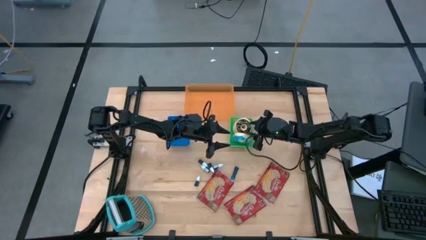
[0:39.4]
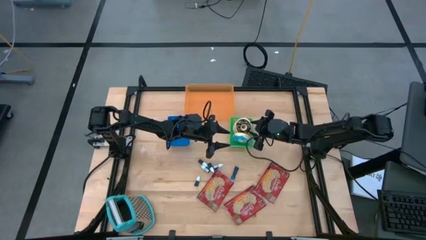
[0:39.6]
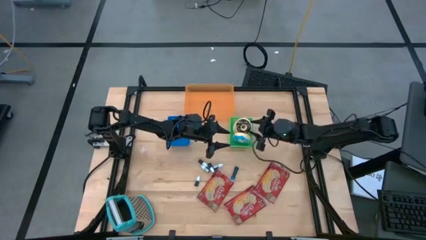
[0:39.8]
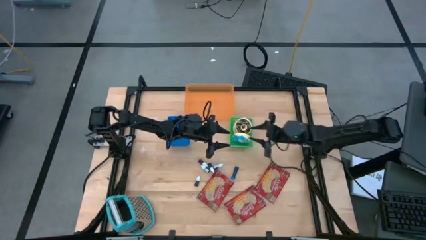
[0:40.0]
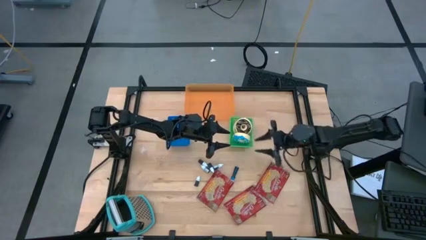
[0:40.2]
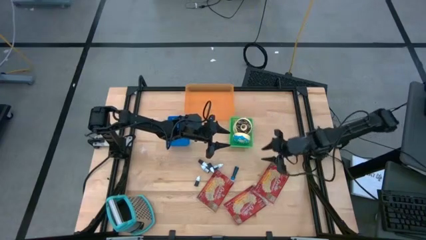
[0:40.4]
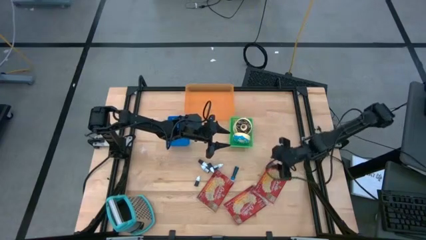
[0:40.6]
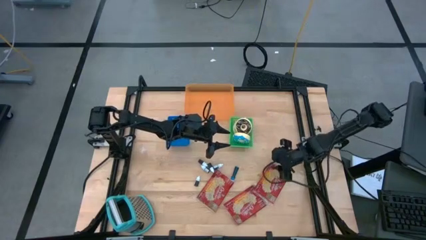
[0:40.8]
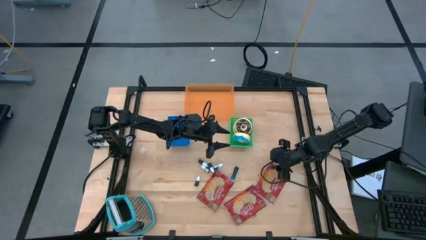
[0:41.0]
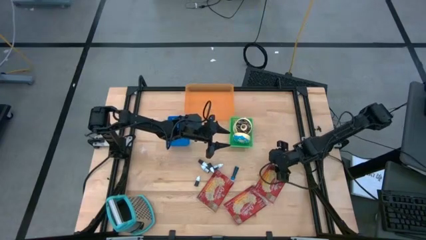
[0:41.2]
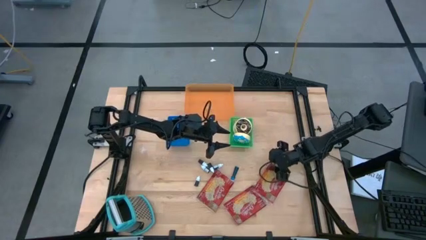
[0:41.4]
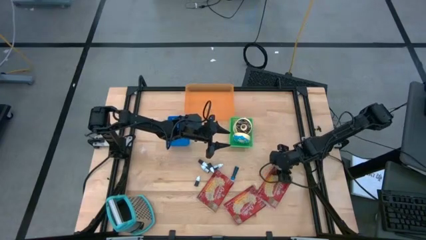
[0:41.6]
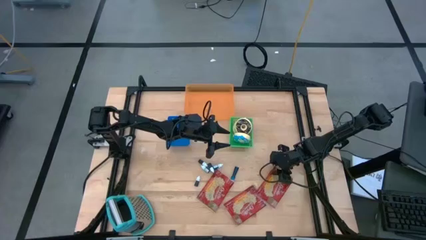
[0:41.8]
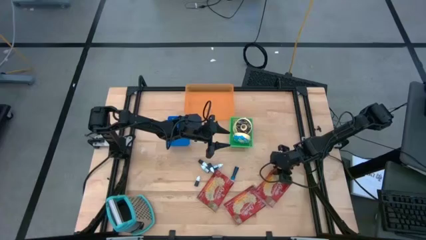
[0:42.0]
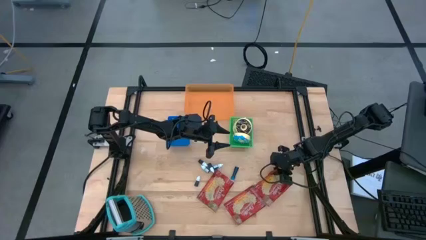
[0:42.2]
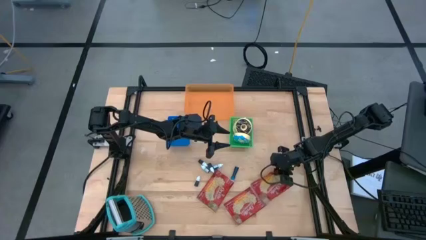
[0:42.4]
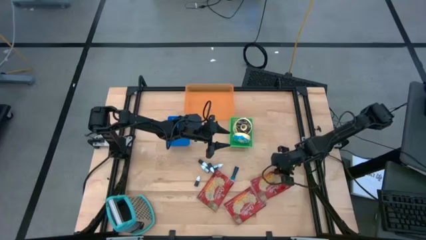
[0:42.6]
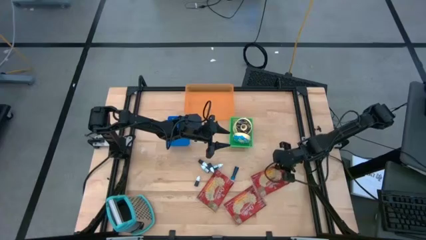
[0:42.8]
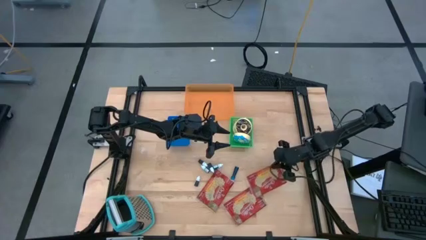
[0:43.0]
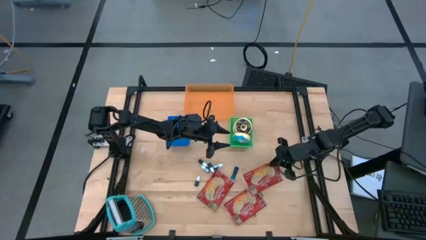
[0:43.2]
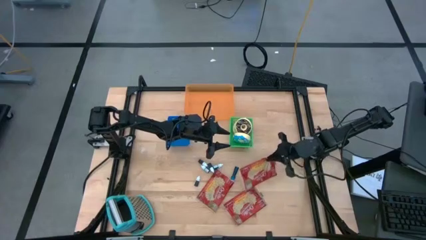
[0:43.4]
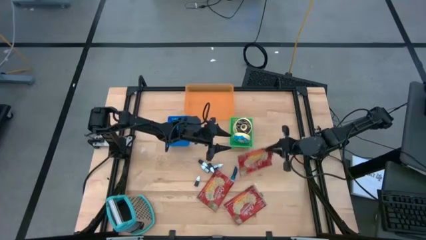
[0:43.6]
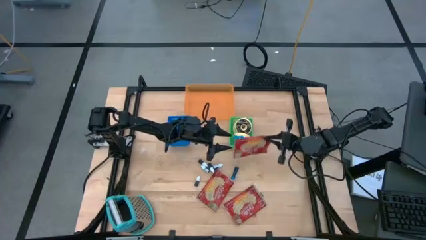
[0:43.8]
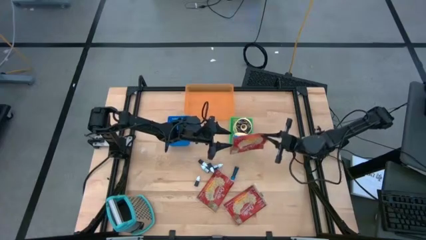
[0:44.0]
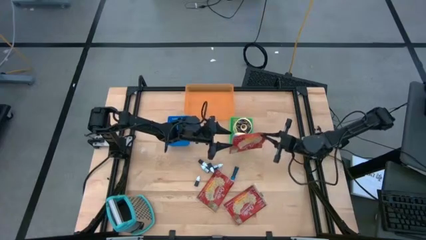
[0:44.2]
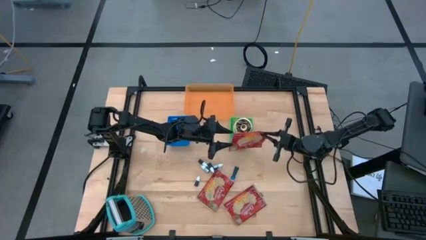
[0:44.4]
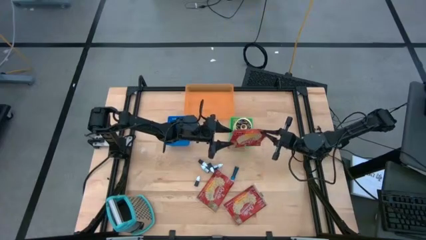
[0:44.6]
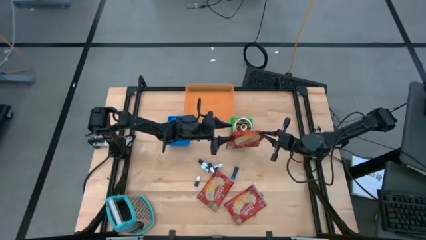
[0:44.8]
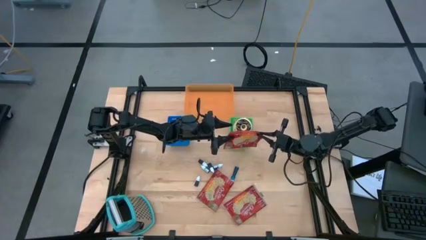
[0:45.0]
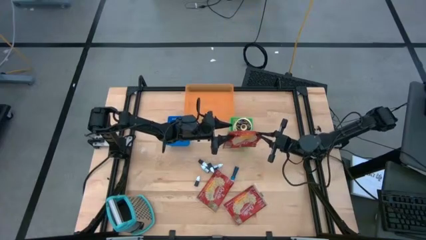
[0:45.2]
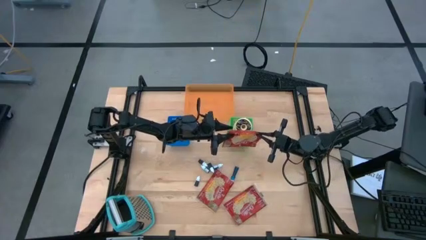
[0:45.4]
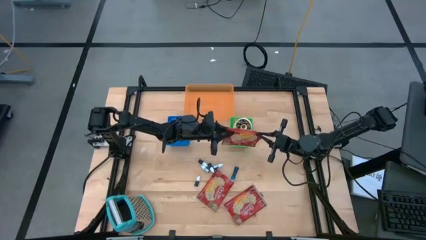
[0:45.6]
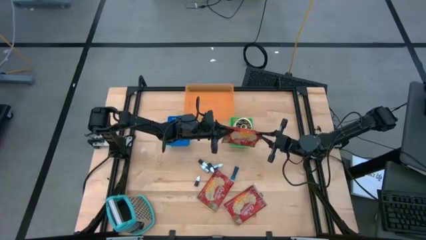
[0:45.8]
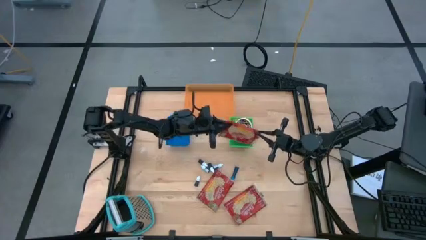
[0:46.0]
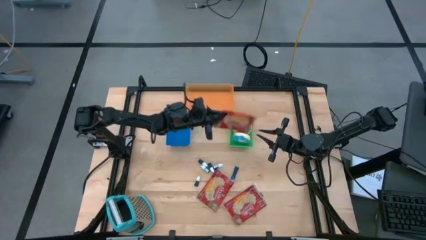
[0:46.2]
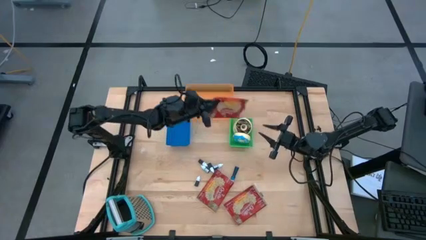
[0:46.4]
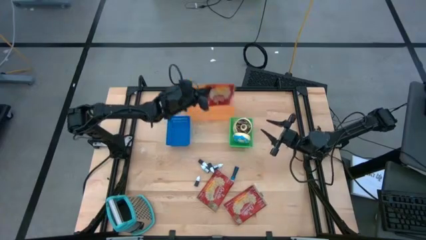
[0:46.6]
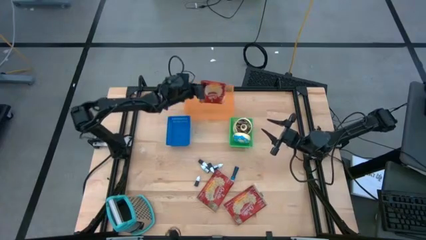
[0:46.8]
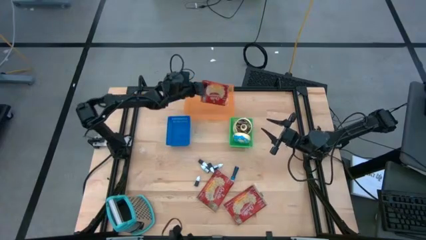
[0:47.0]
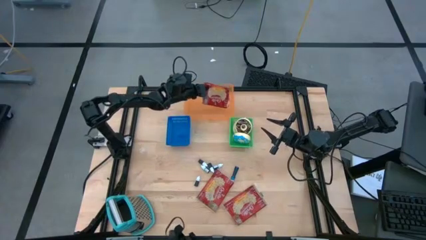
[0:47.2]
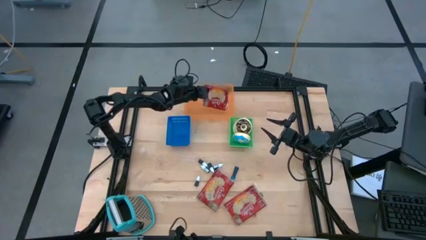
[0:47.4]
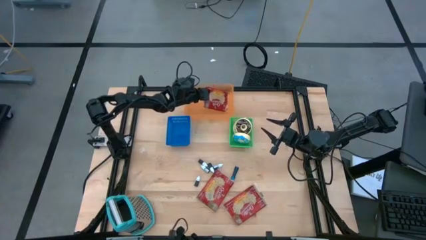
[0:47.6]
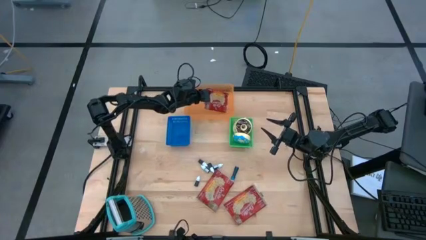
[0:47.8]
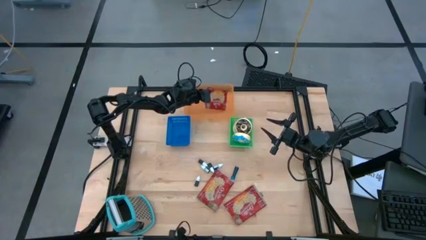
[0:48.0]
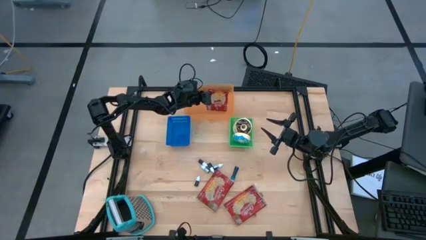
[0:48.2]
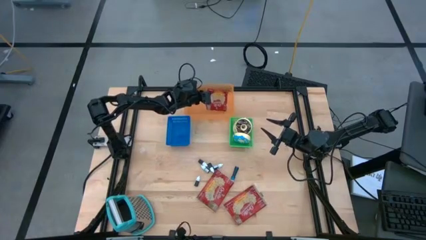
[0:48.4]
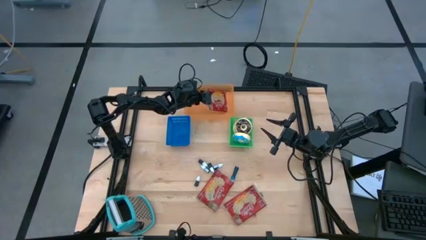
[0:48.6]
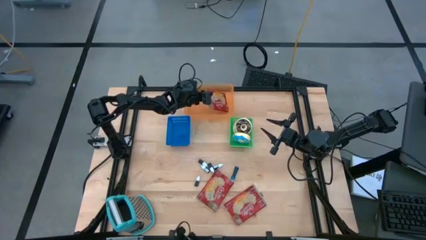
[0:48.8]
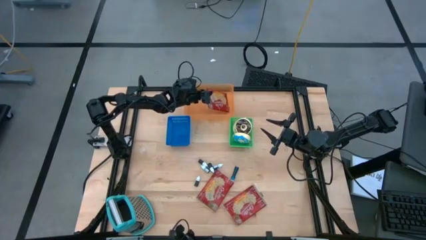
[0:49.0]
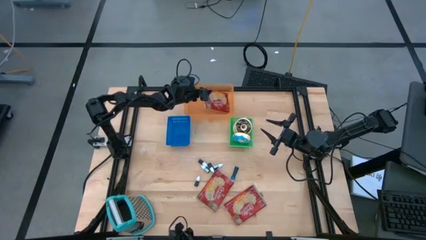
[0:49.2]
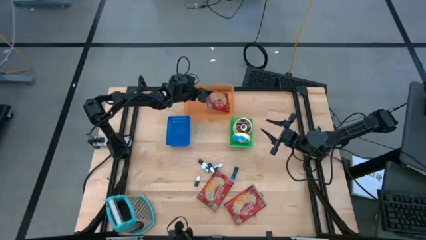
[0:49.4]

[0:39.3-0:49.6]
Put the right red popcorn bag into the orange bin

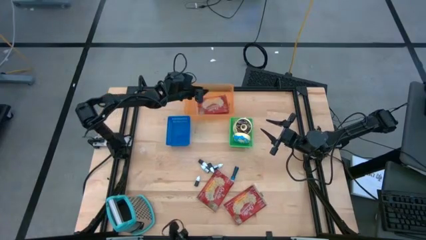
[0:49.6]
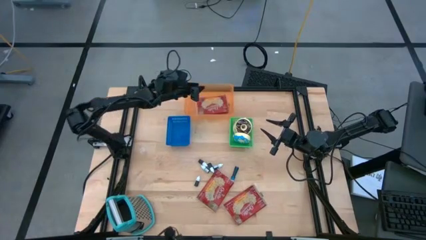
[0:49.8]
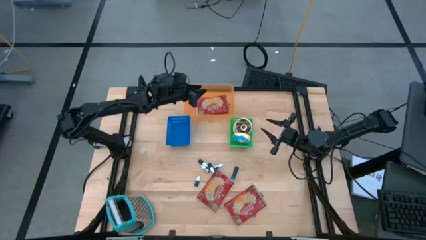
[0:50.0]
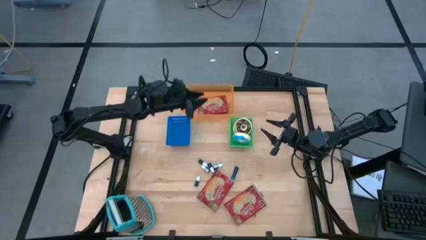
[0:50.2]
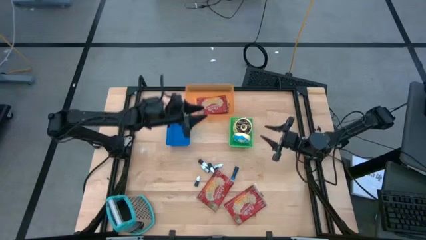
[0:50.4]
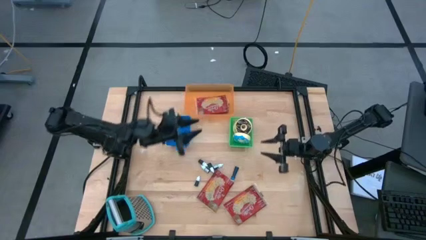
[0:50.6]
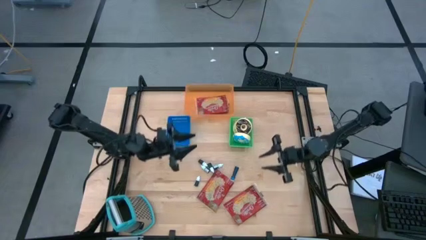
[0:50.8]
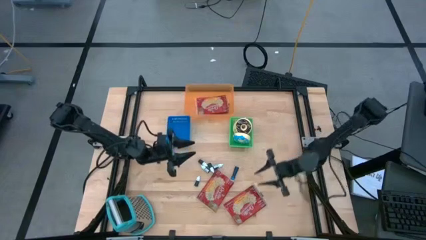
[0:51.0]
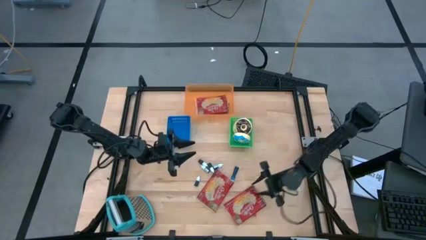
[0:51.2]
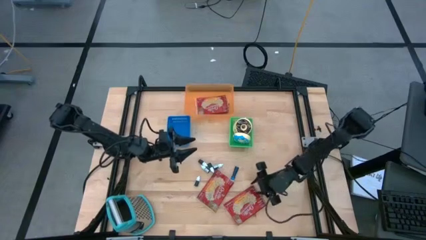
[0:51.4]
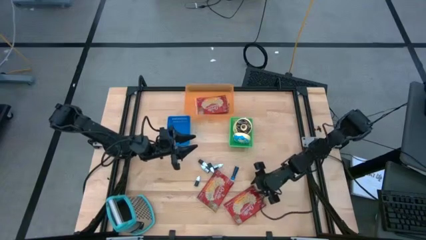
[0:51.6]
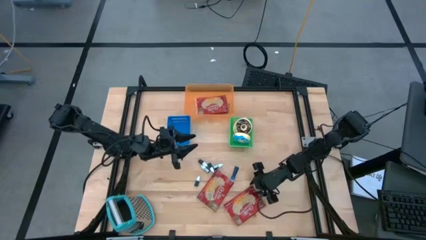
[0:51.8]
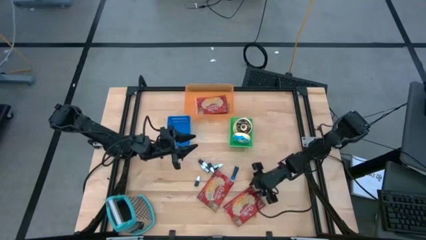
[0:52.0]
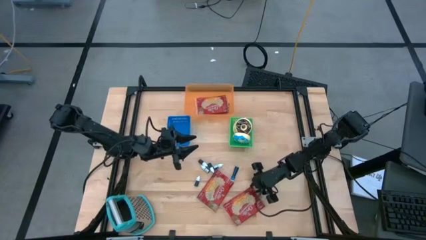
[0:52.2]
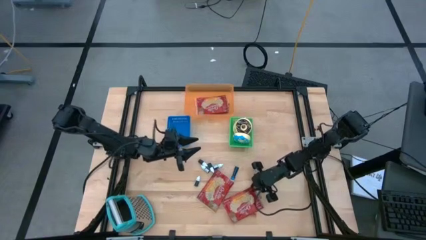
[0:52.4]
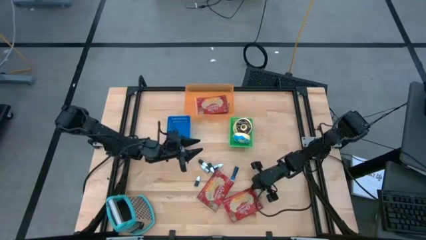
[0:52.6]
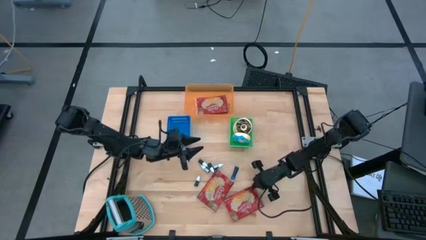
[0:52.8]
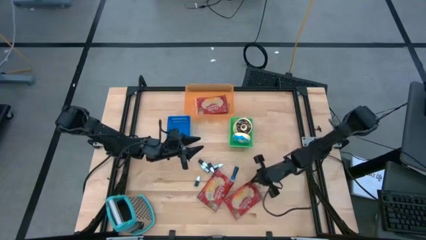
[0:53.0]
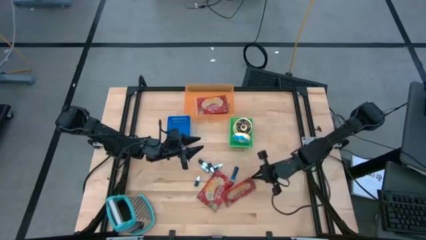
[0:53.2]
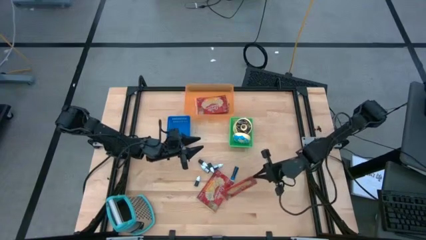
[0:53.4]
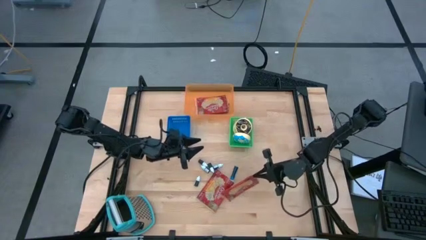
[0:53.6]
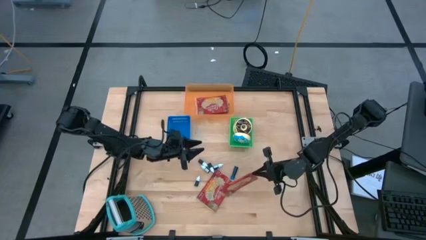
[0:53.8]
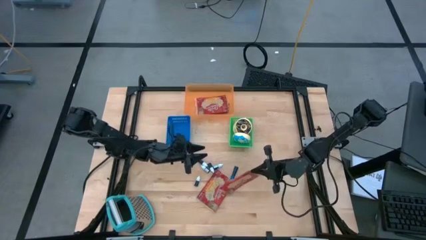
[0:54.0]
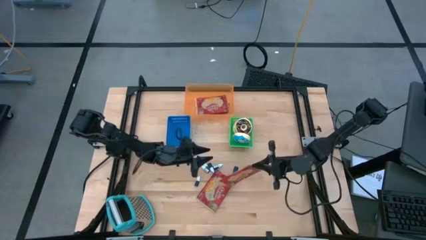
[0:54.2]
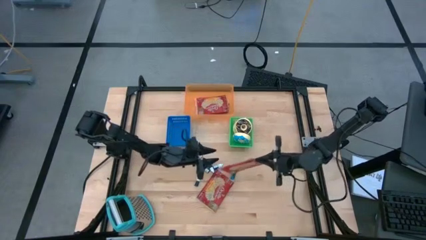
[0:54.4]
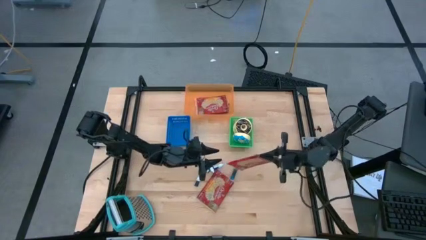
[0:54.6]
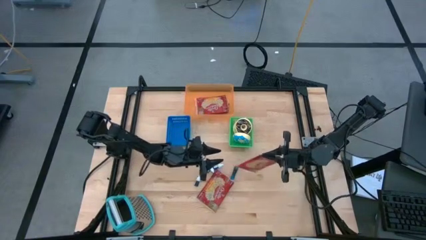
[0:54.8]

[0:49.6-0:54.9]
Put the right red popcorn bag into the orange bin
